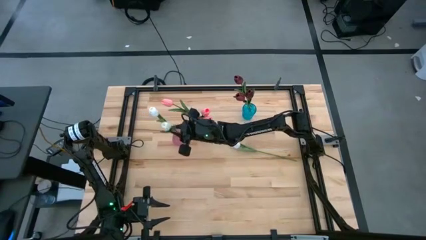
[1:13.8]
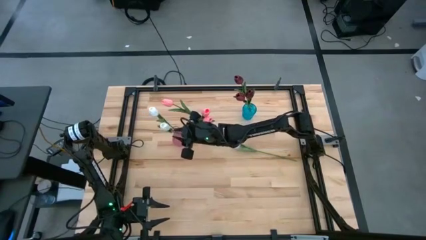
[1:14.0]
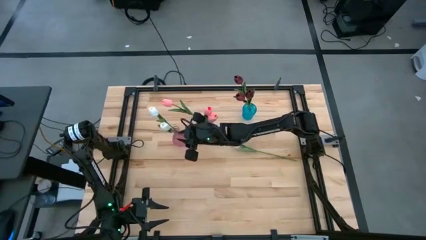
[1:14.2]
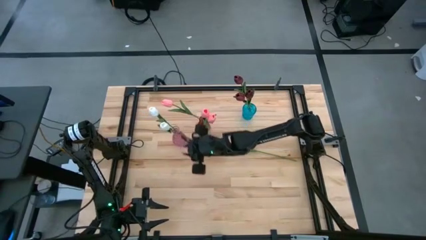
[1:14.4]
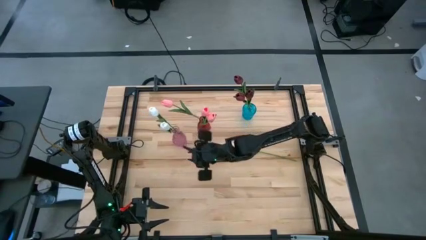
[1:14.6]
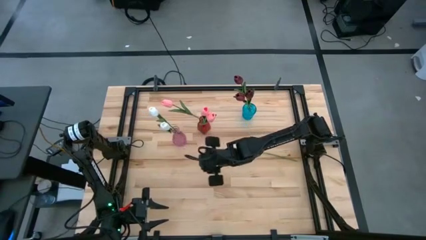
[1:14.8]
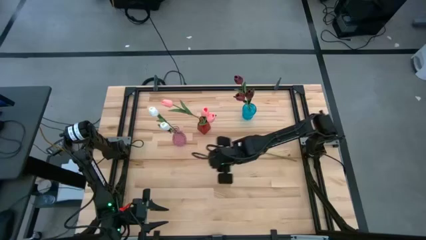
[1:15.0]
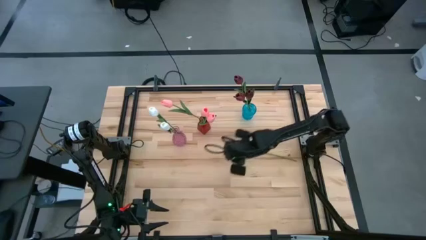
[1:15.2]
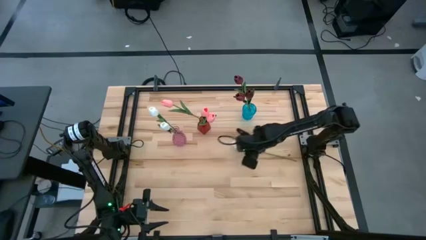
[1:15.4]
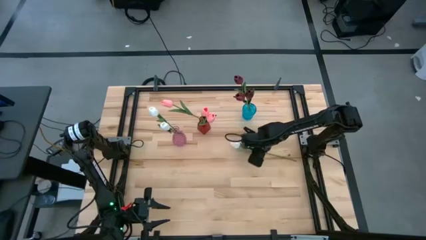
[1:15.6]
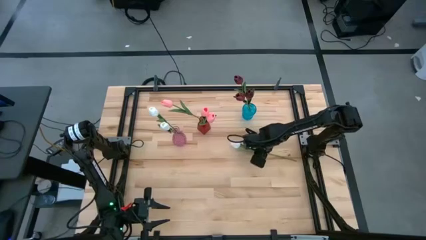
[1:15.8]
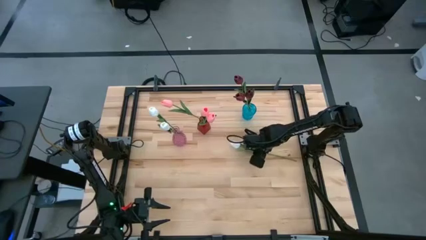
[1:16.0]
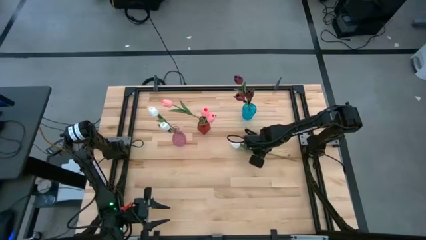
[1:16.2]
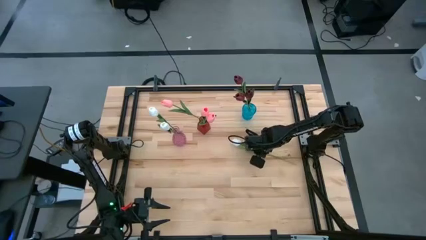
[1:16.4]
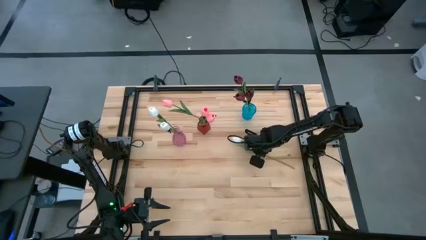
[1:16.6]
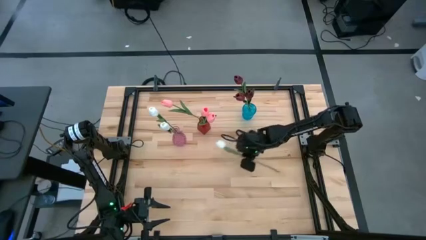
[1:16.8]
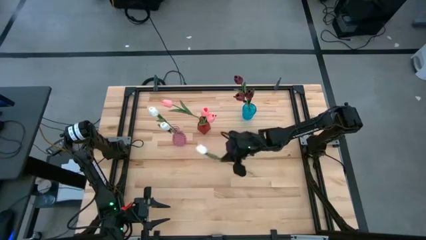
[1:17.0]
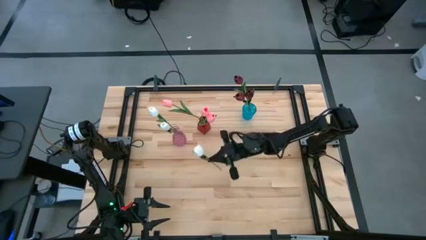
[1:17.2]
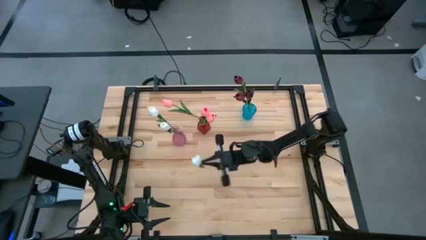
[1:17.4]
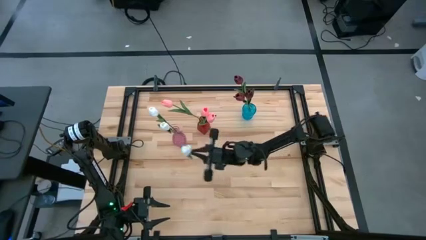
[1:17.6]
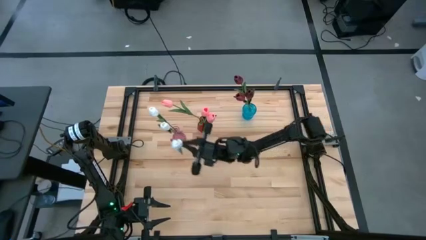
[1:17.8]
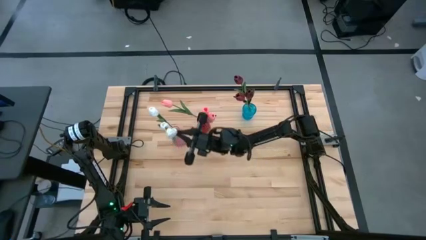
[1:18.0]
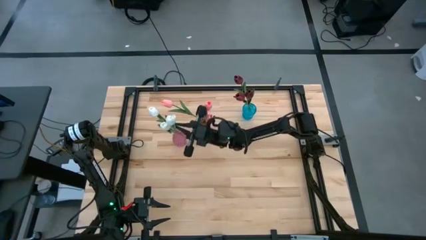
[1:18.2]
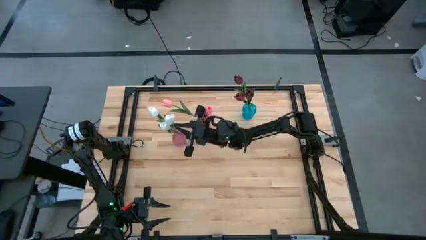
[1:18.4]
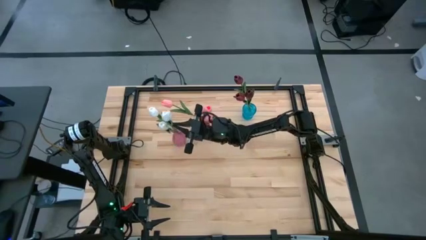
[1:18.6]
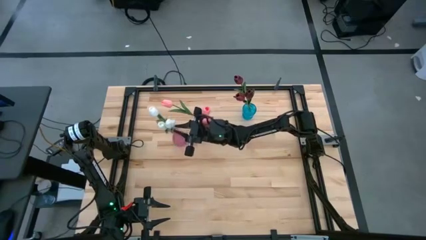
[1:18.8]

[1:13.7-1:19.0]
Task: Sort flowers into vase by color
Put the white tulip into the pink vase

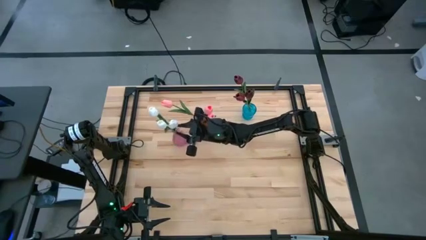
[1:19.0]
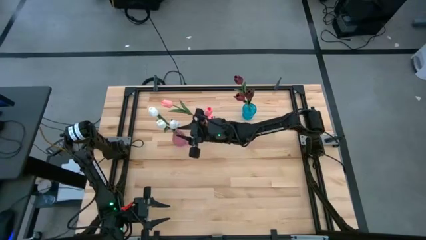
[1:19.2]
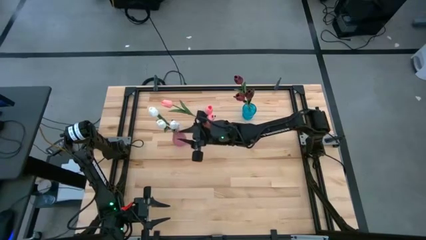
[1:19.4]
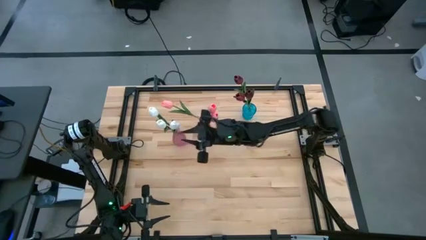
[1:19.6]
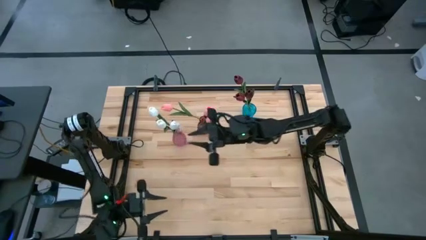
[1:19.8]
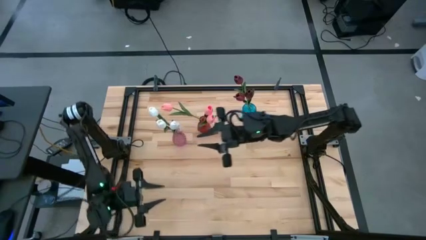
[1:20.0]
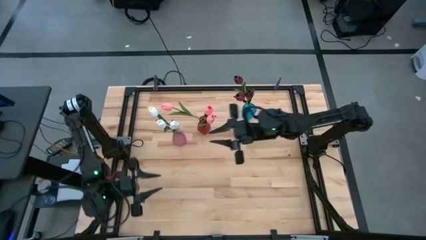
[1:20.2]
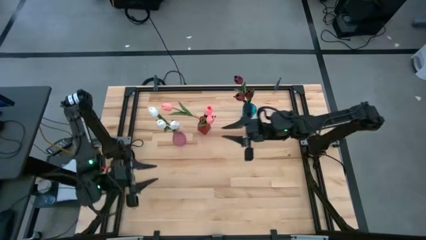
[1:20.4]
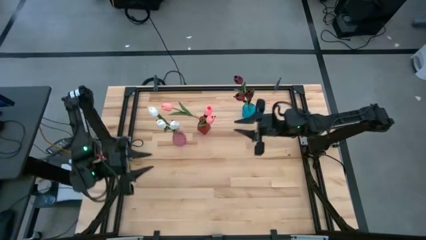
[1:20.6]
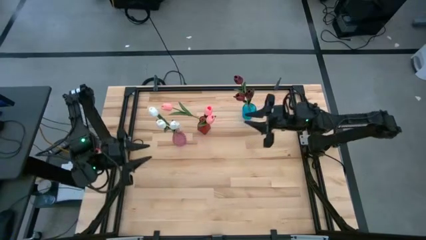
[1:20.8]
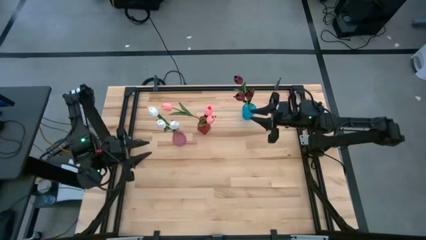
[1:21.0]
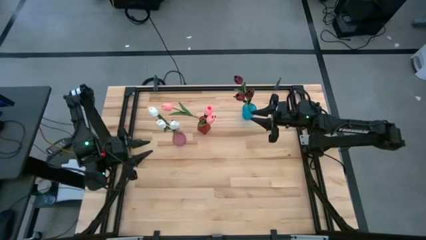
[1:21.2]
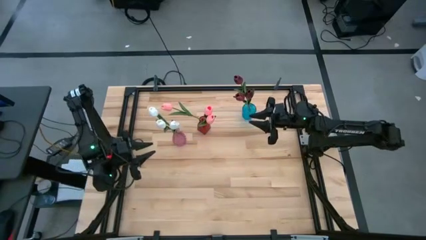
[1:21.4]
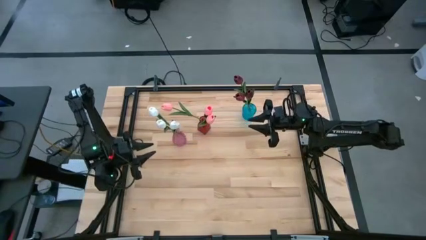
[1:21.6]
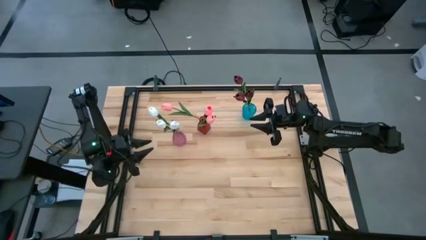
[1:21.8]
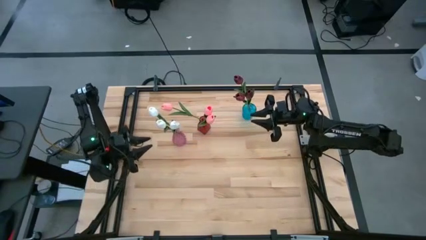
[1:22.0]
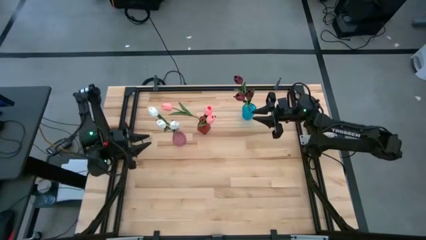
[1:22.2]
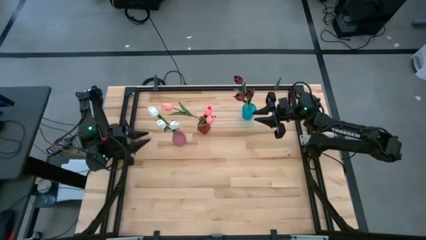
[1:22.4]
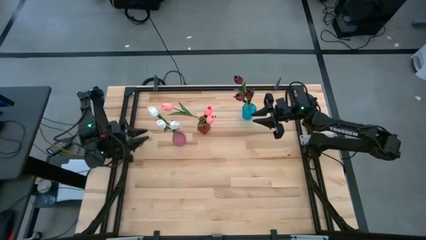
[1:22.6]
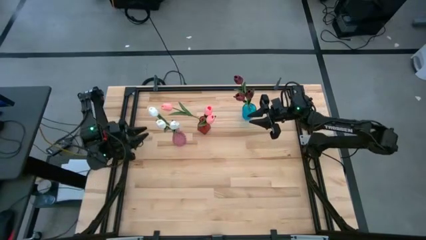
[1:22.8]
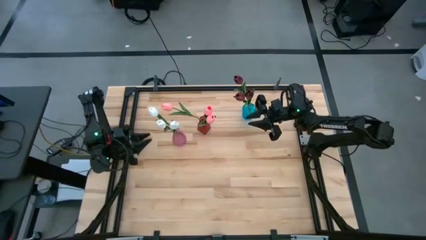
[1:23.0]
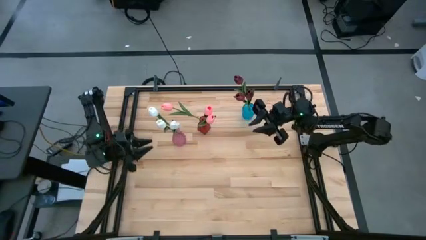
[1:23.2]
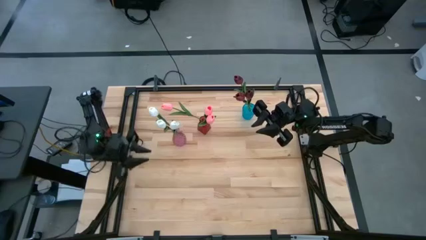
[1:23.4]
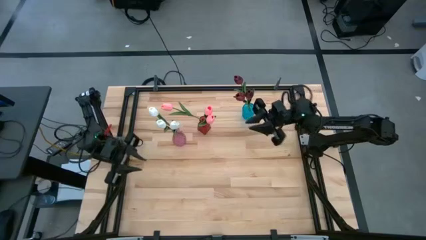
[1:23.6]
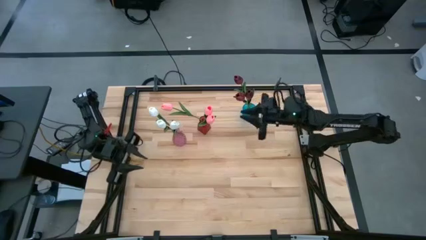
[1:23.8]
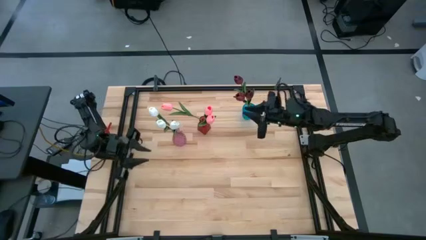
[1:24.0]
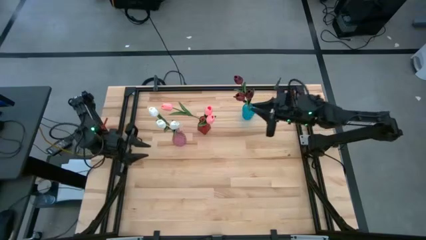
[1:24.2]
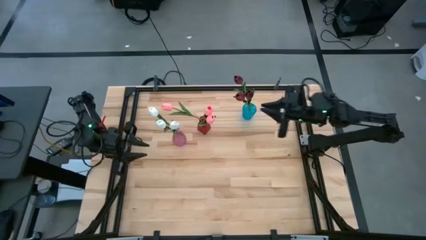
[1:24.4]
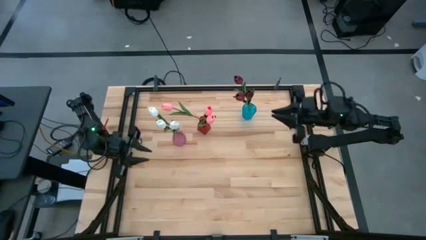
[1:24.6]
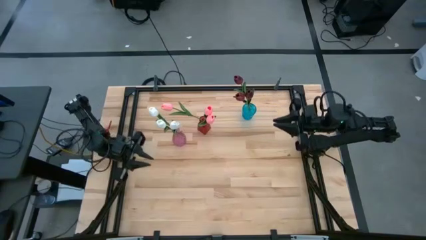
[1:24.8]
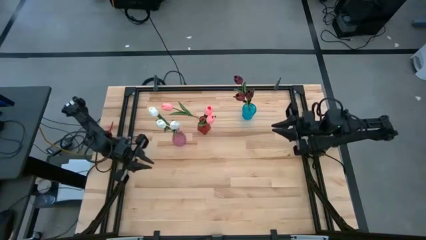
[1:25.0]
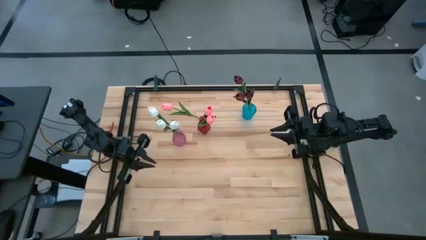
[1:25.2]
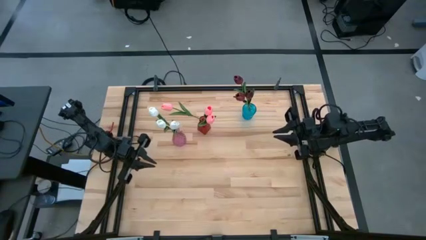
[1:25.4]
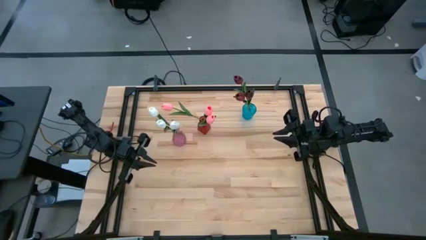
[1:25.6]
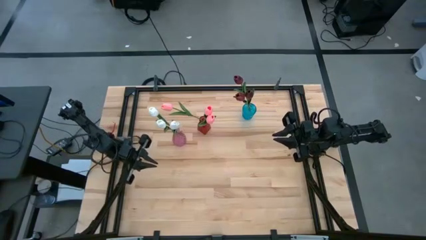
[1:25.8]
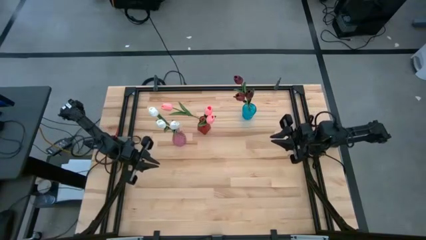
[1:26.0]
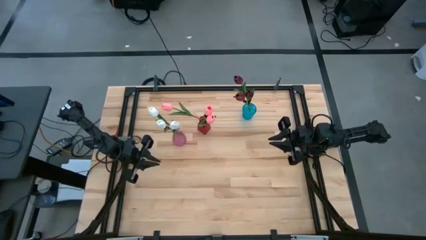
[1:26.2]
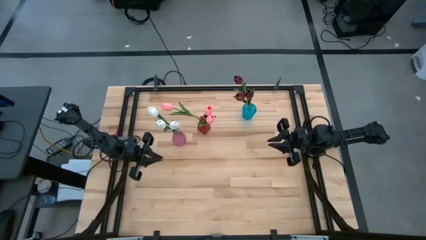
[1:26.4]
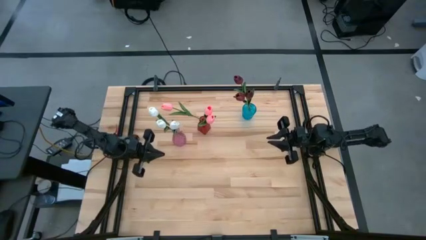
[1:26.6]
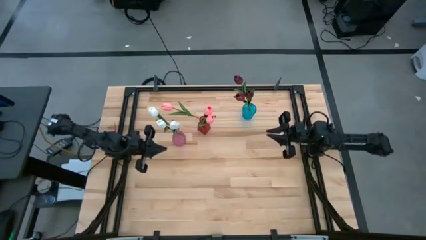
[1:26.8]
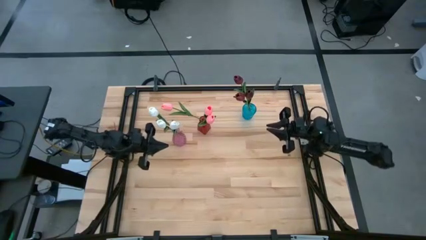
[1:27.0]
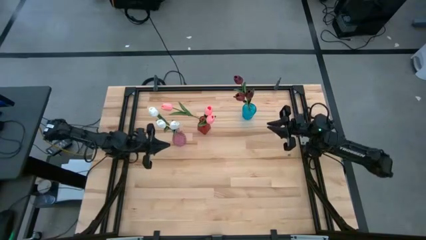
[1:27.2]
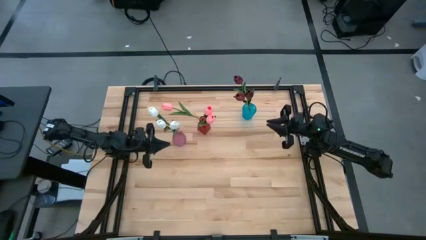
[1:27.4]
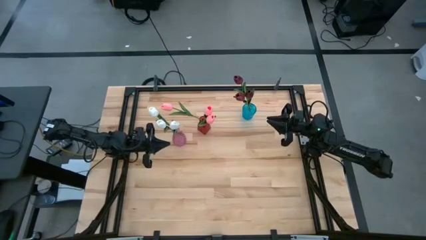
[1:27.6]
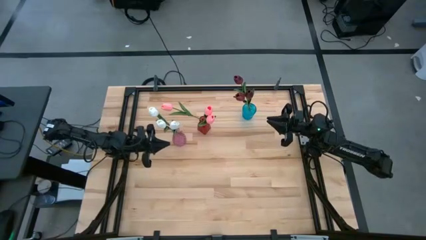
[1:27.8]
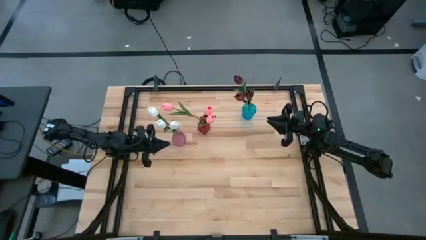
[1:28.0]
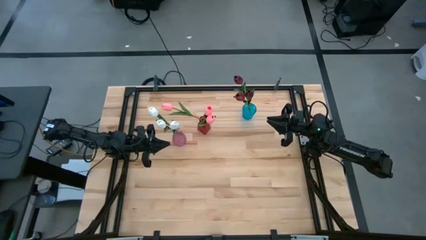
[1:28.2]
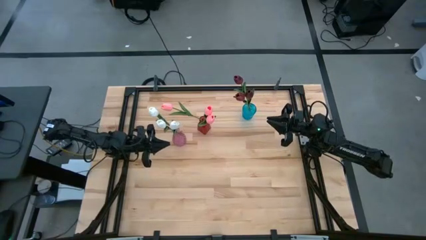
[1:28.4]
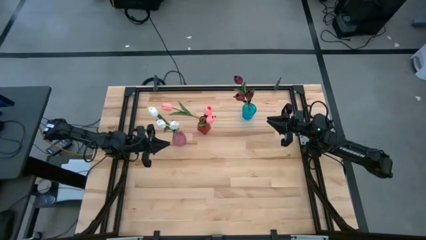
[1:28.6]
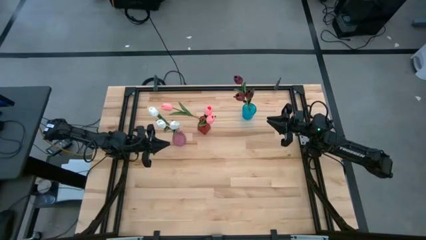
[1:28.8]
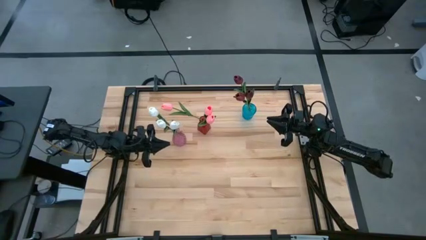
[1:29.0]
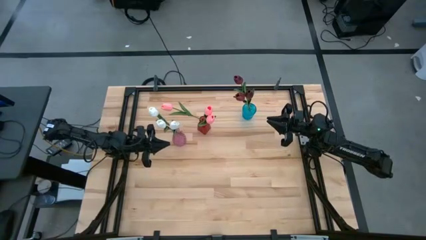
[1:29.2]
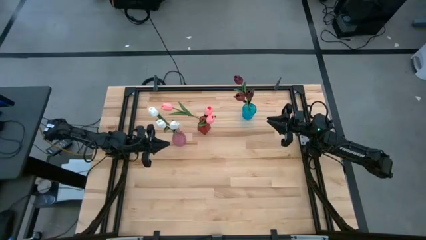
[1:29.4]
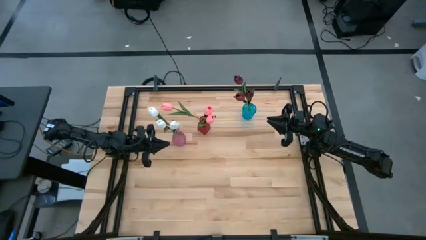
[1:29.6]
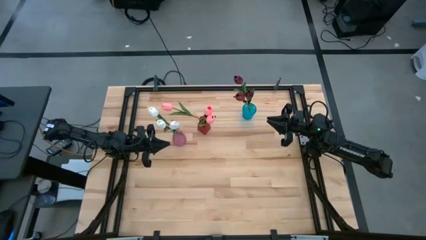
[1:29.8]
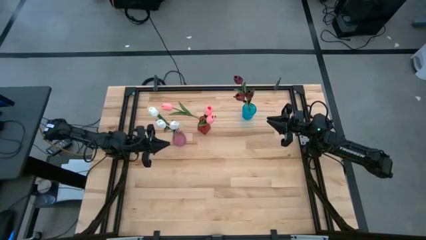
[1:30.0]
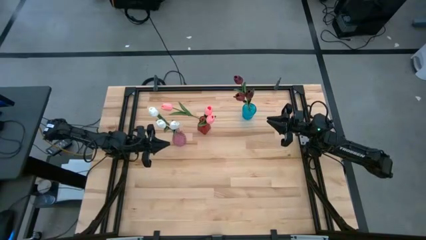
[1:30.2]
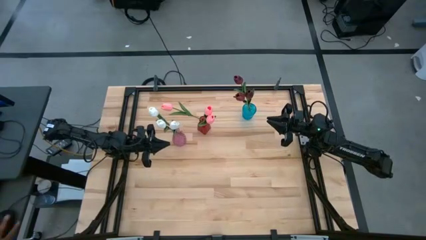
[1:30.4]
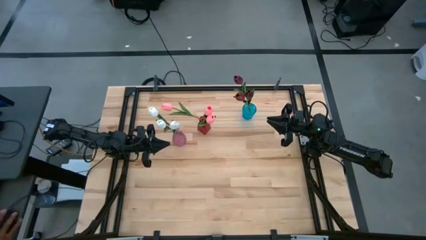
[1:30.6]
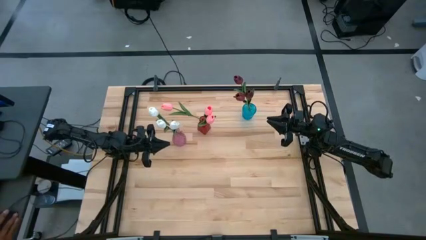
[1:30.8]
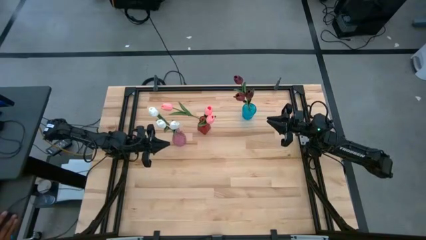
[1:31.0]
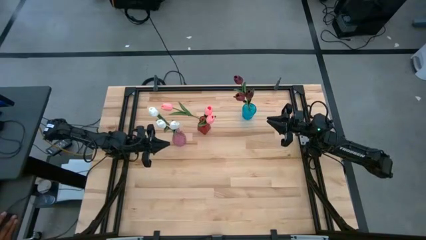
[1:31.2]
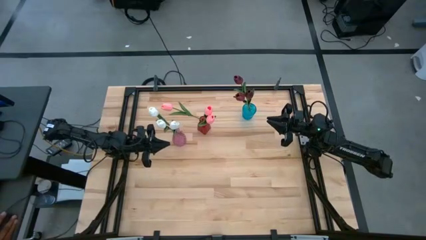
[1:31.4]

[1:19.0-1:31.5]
Return to Home Position
